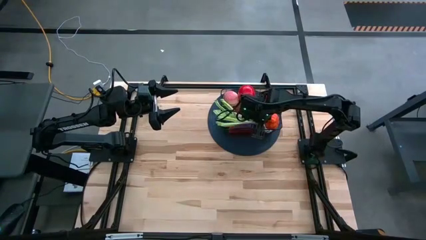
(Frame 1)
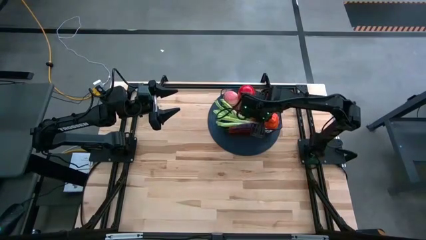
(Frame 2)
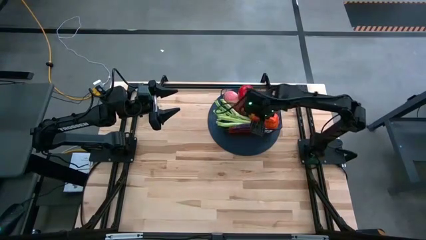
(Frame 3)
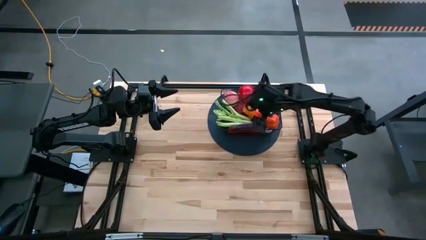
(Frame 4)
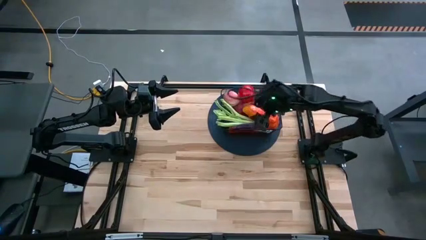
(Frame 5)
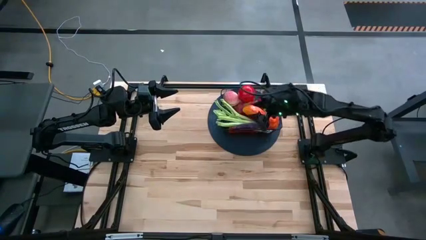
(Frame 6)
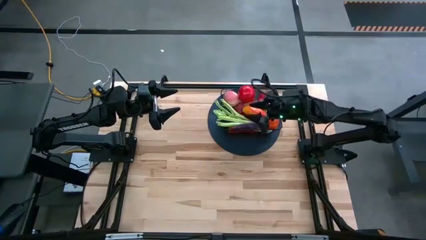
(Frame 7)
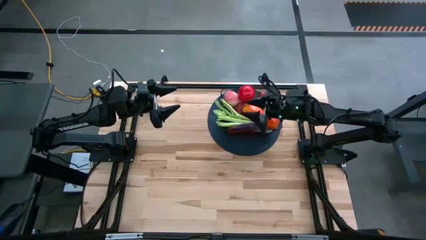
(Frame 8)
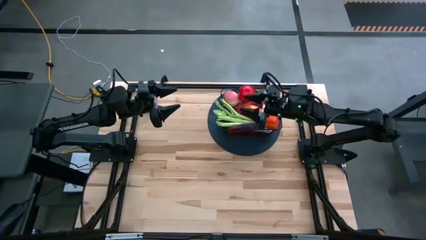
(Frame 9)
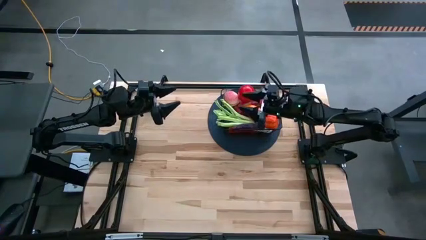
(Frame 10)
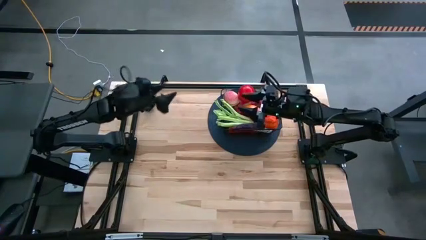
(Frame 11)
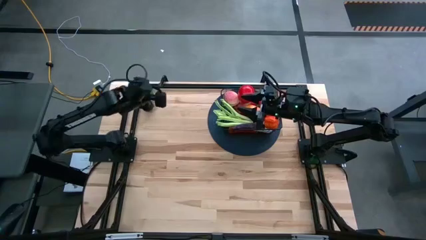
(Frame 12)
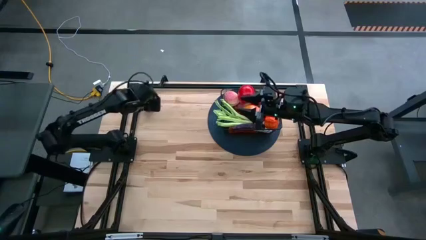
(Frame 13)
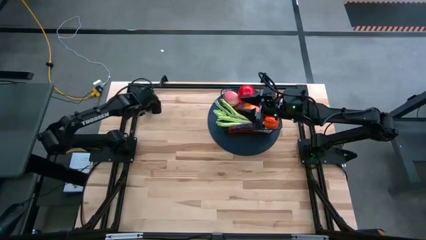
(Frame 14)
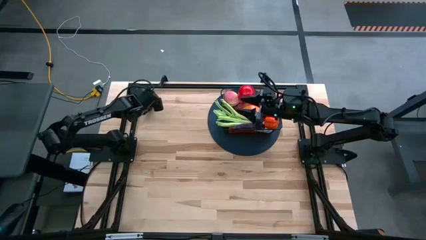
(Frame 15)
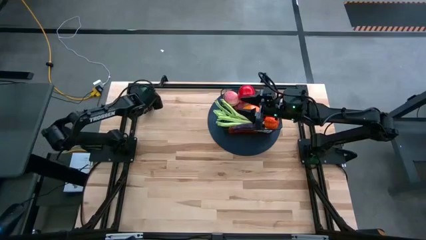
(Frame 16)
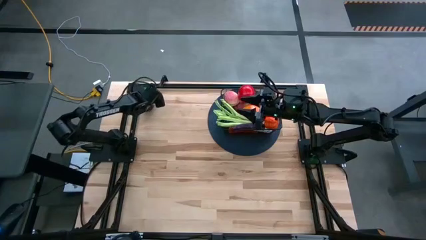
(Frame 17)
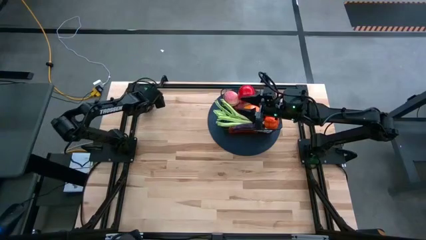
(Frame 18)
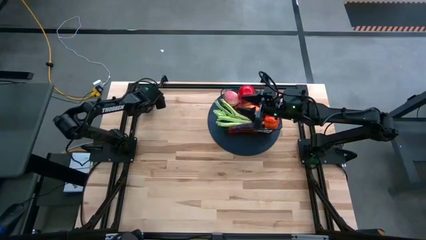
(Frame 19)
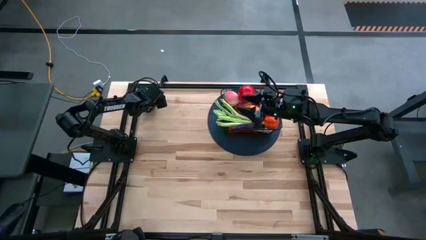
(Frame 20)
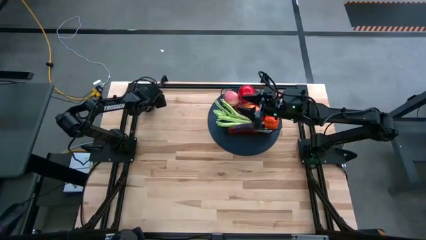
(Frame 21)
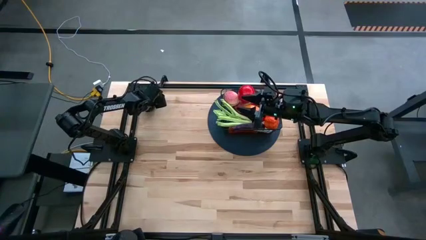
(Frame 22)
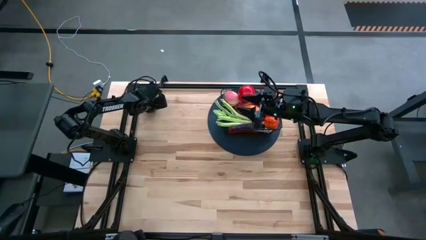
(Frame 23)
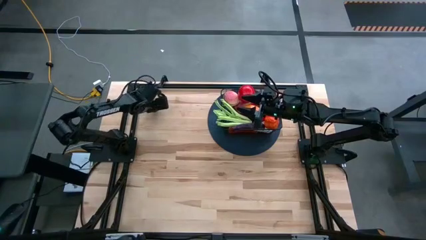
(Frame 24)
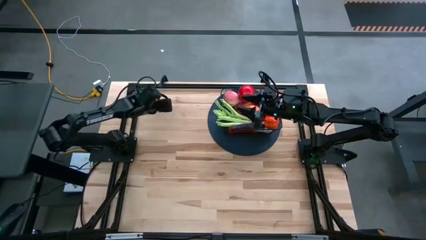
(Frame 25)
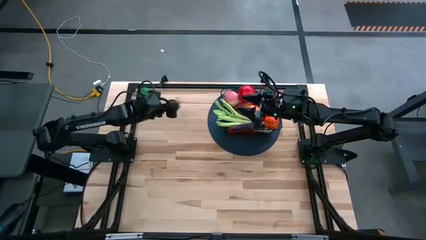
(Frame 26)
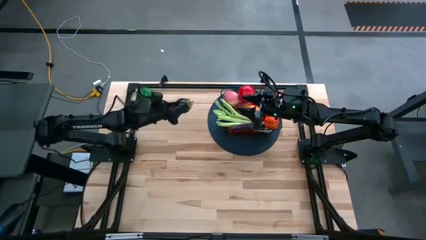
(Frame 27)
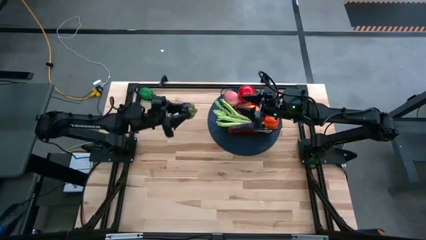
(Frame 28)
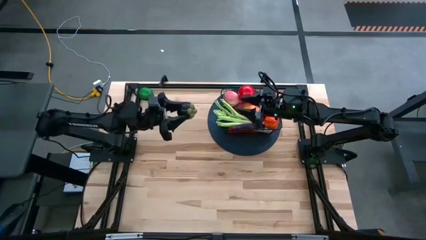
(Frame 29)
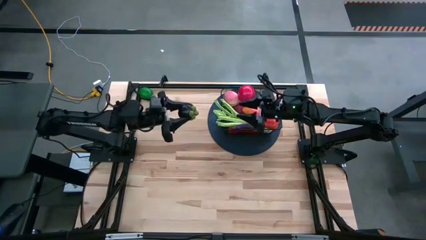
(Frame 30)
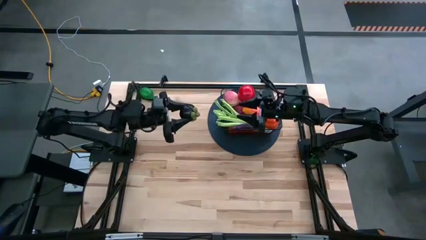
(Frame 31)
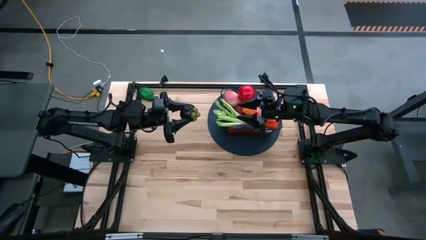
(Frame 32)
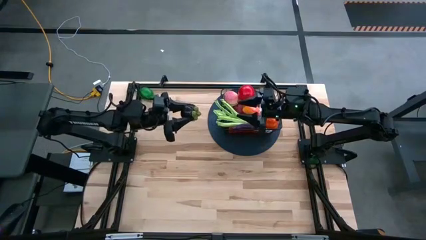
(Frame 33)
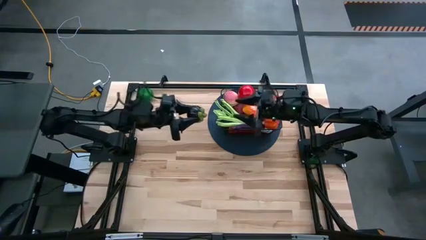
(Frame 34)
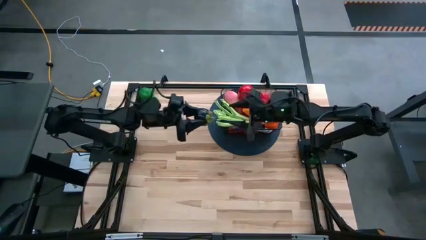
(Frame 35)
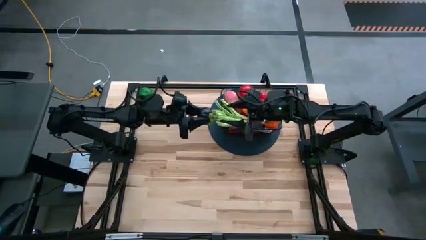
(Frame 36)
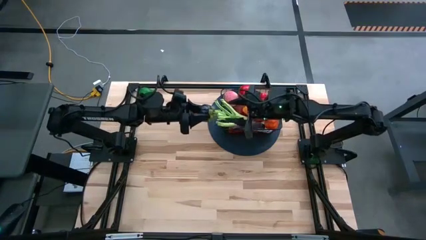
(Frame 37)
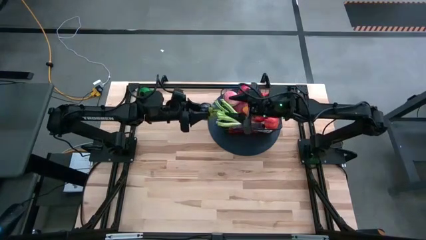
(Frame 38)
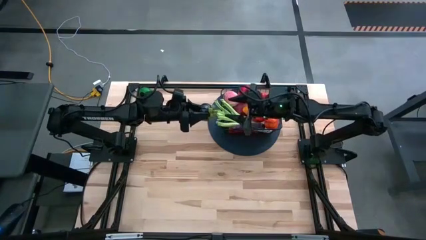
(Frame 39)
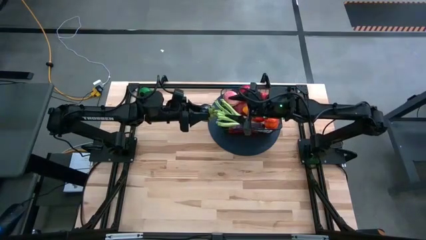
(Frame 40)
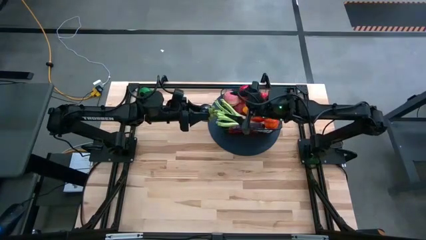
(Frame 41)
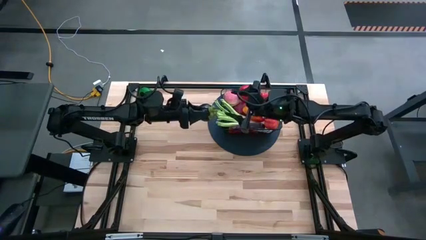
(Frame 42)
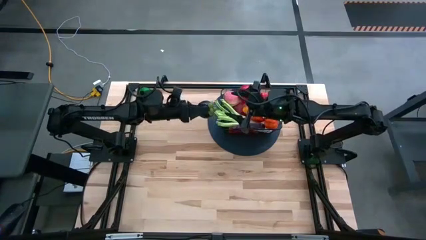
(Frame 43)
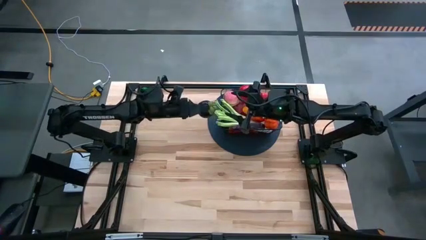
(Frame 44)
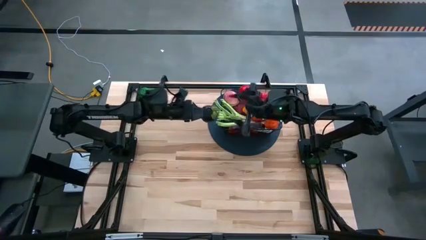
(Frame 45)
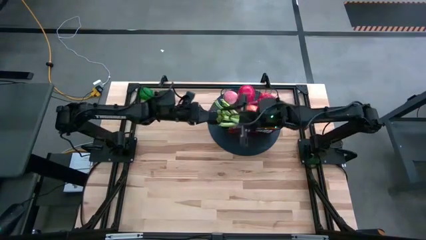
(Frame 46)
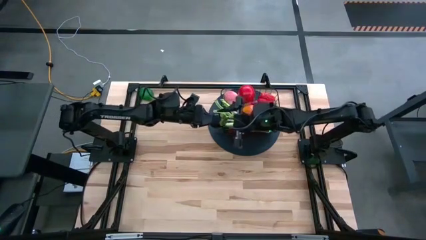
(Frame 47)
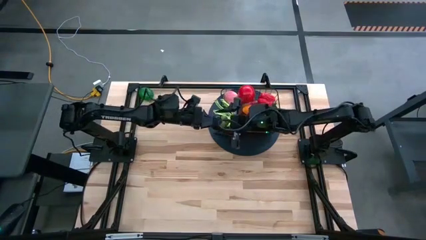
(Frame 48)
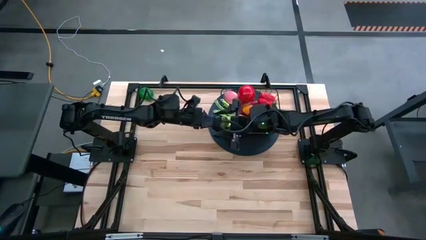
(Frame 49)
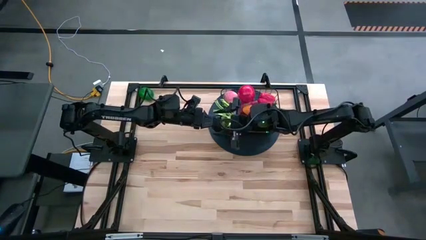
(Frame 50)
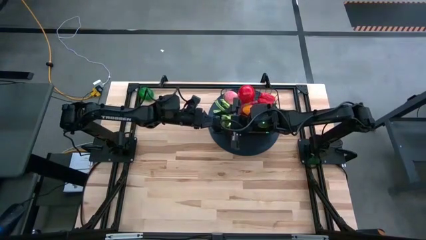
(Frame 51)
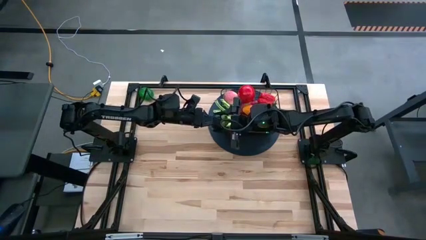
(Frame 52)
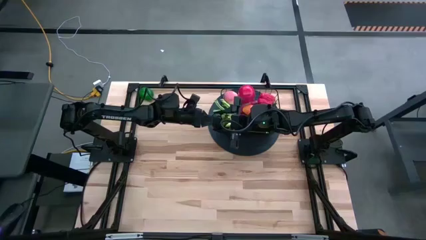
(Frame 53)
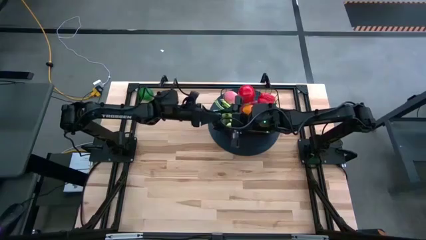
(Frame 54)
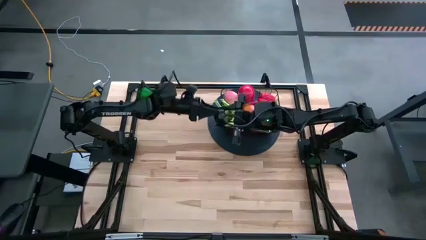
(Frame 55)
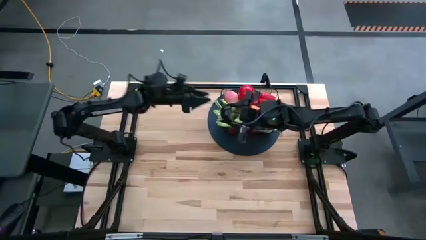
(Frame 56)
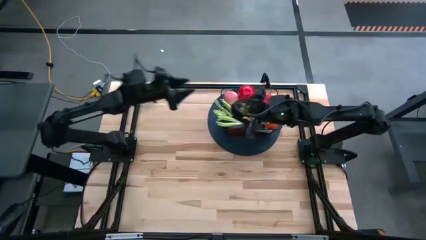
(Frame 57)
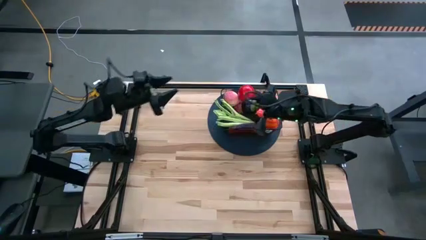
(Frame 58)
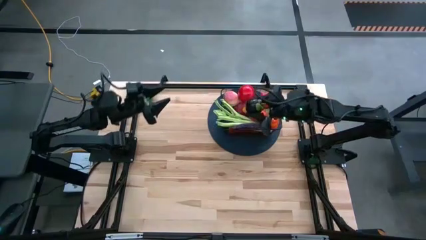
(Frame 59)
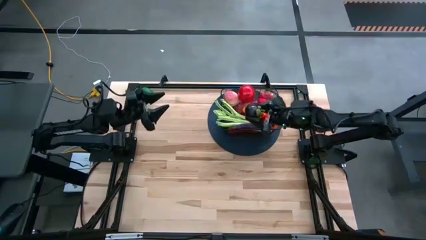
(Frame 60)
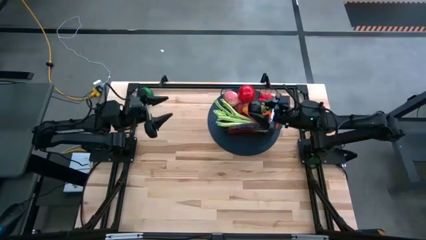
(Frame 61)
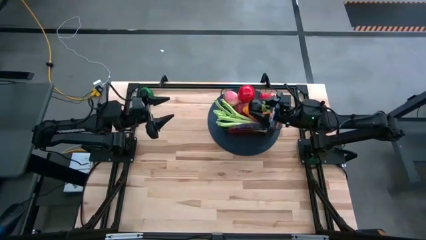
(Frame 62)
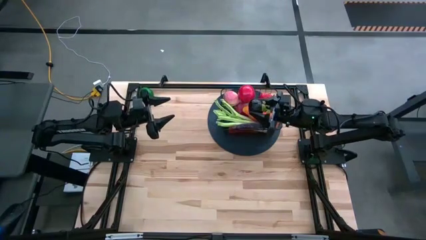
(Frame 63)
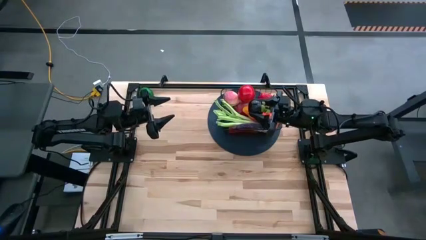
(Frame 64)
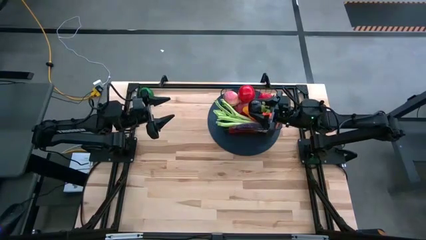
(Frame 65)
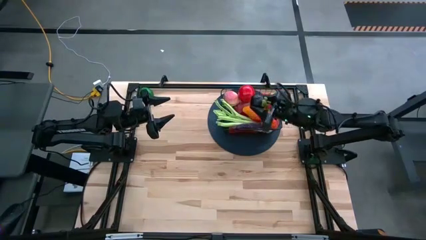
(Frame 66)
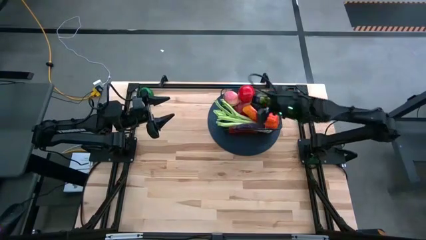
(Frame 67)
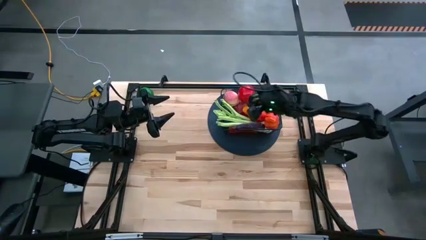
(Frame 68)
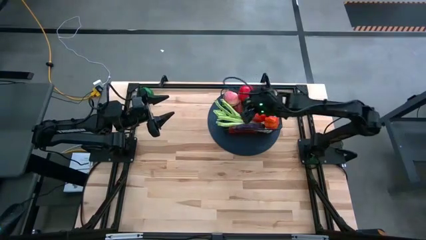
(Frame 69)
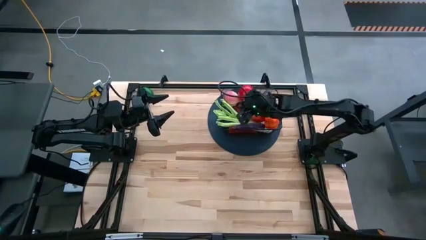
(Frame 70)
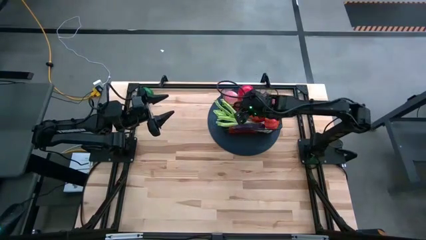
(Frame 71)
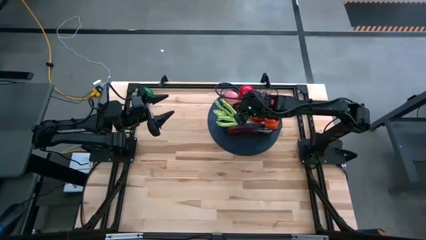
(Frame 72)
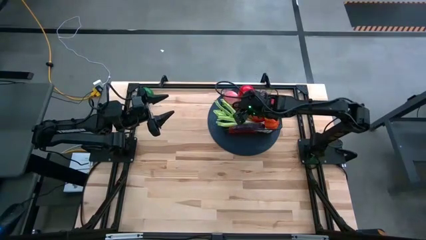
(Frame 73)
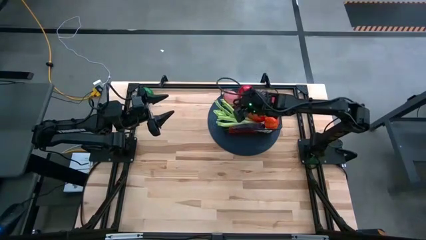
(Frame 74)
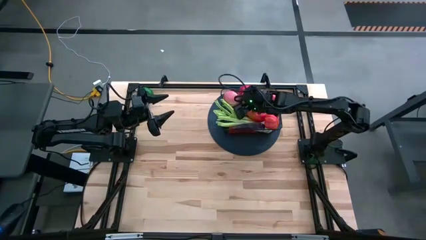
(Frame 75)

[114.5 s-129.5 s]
Task: Build produce basket
Put the mangosteen into the black wire basket
